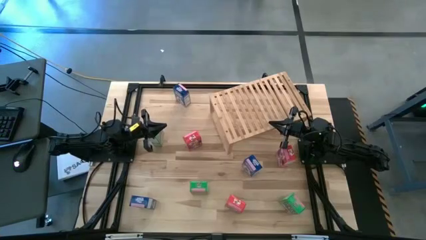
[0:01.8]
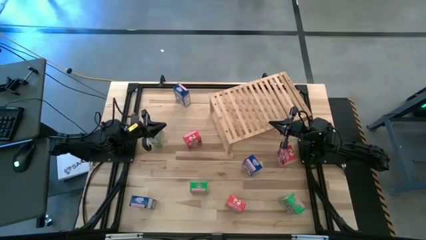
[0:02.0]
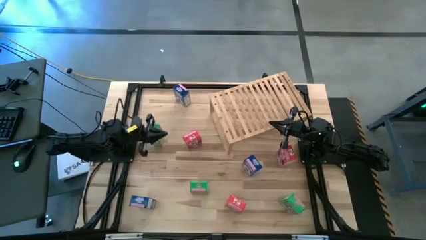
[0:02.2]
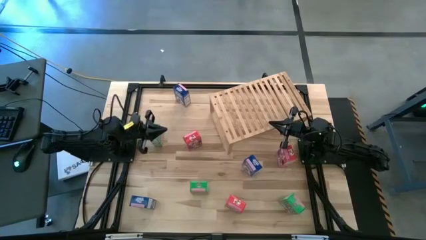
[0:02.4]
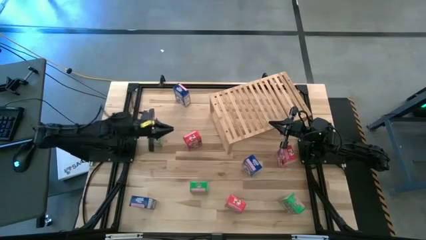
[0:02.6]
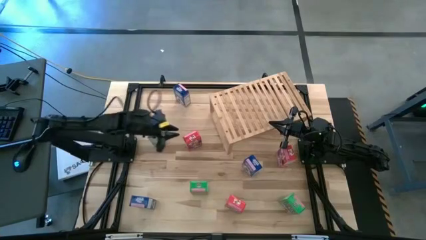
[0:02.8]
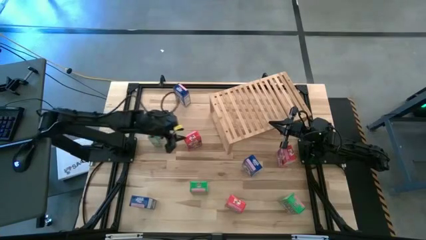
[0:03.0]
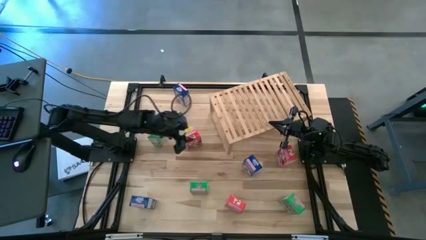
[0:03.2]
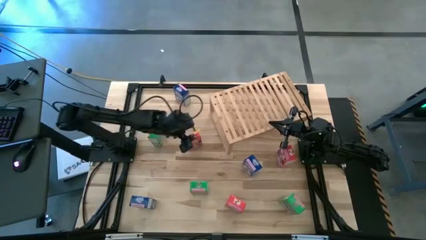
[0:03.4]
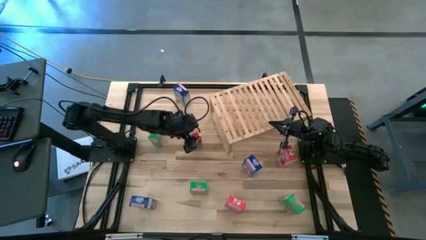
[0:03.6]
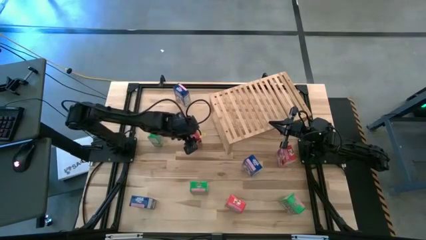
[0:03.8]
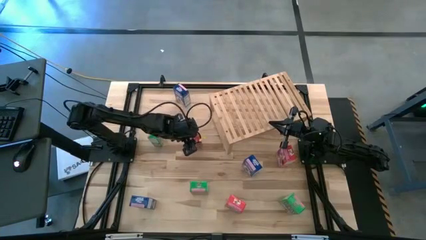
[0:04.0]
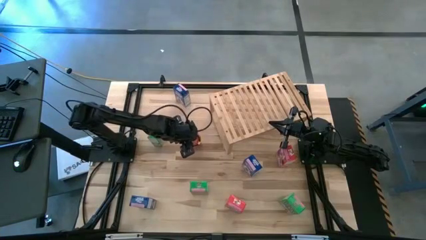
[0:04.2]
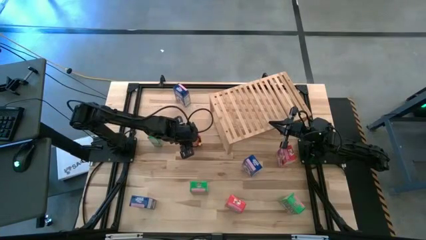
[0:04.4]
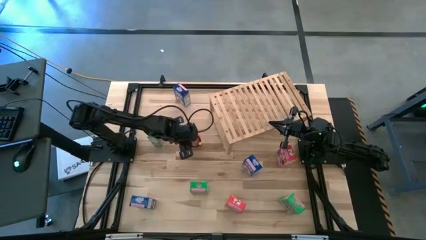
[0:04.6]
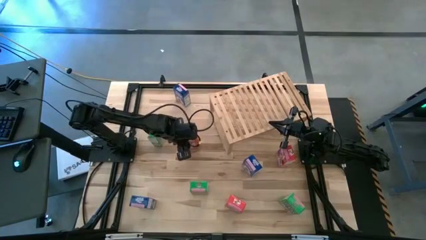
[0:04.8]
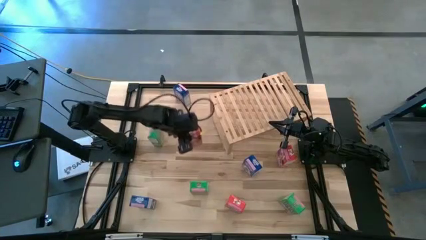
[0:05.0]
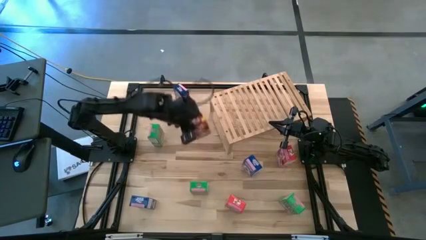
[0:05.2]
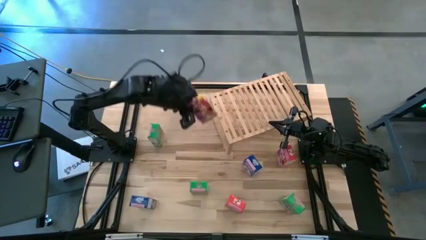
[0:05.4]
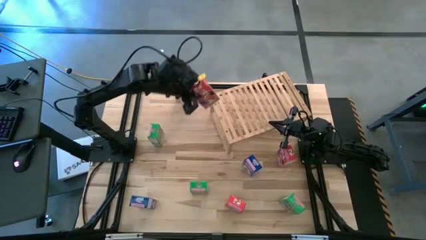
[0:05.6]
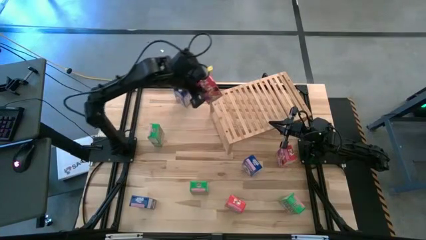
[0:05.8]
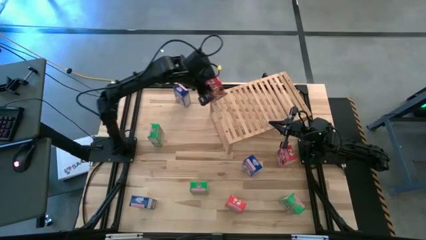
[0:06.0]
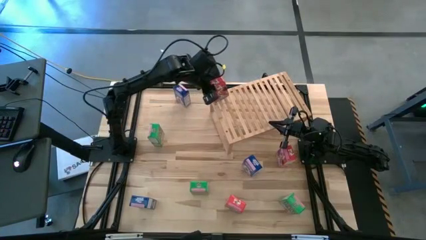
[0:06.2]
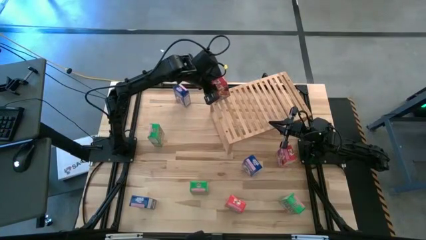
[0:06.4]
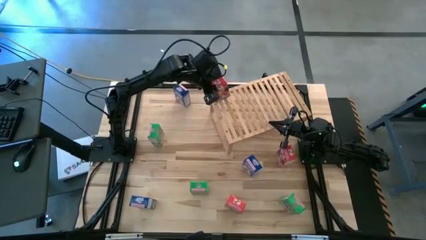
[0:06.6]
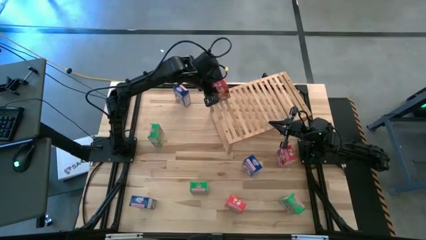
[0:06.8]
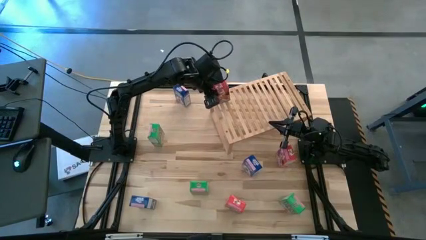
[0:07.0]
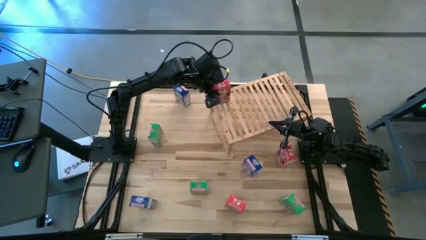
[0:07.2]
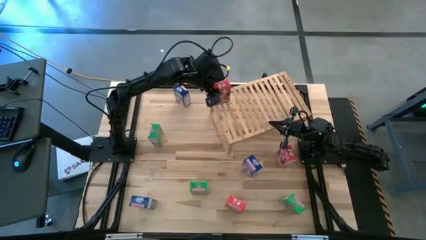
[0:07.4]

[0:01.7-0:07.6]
Task: Stack cereal on shelf
Put the top left red cereal box on the shelf

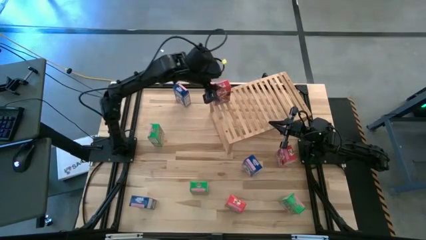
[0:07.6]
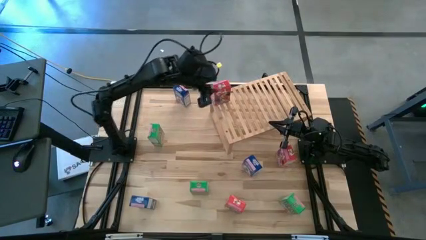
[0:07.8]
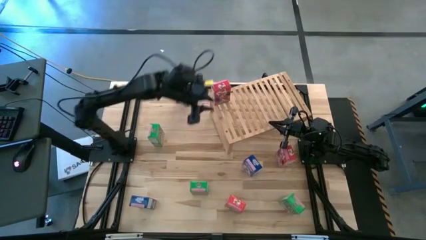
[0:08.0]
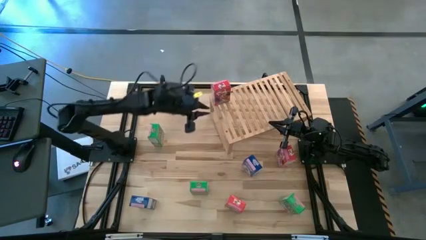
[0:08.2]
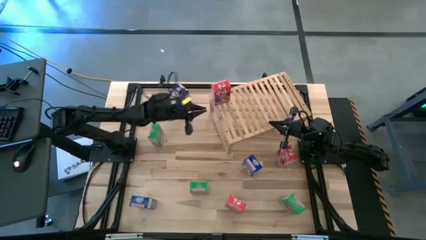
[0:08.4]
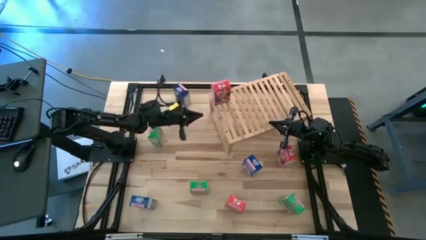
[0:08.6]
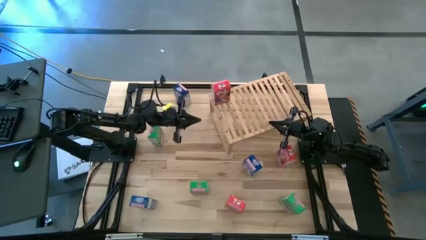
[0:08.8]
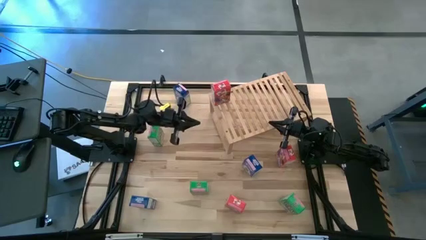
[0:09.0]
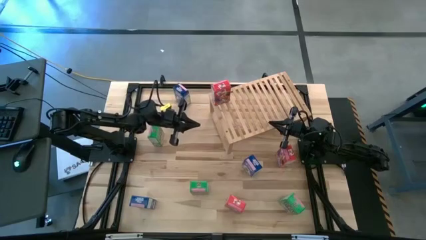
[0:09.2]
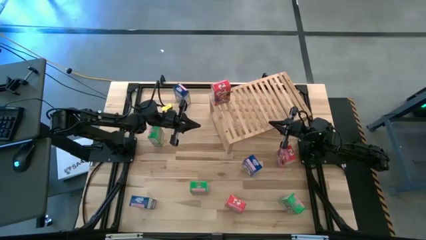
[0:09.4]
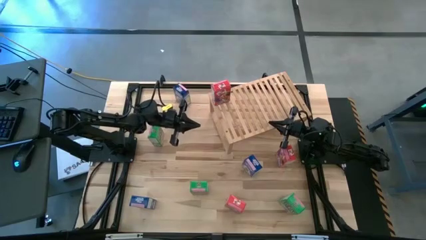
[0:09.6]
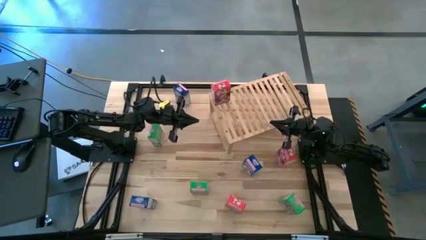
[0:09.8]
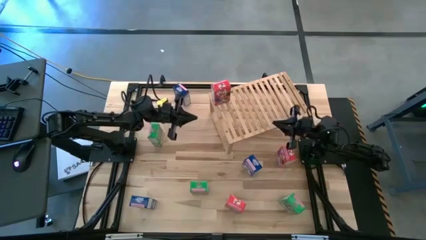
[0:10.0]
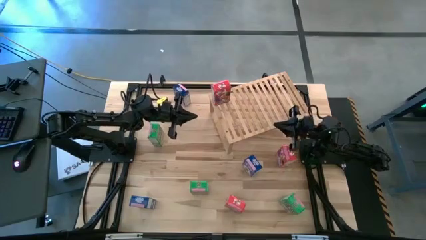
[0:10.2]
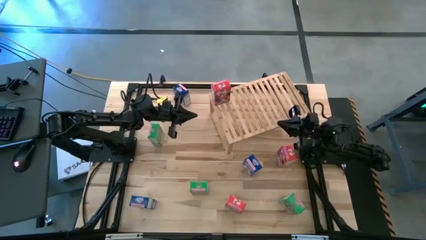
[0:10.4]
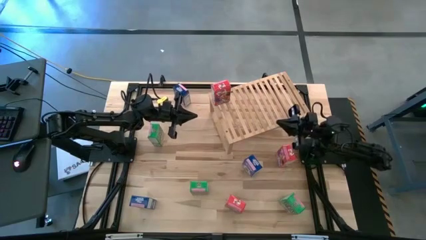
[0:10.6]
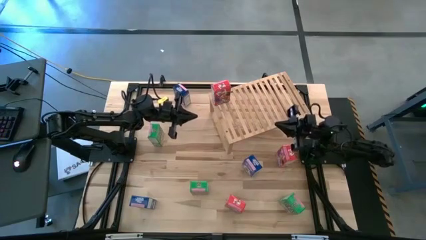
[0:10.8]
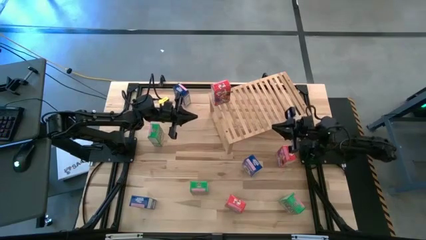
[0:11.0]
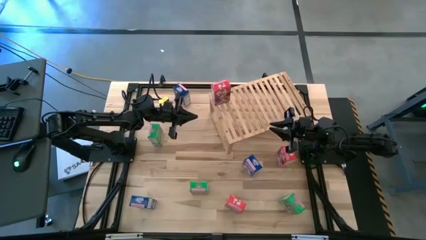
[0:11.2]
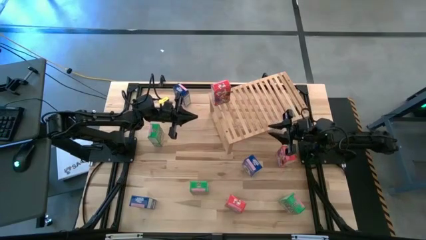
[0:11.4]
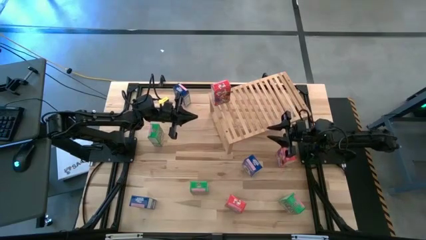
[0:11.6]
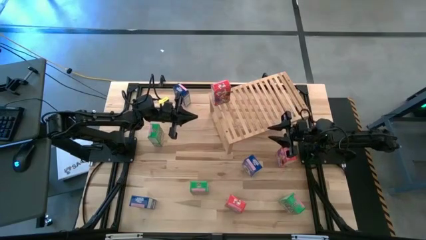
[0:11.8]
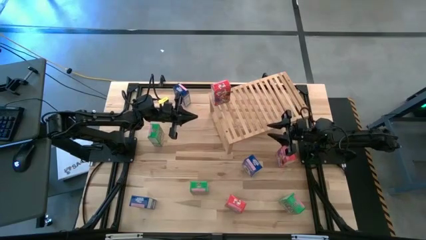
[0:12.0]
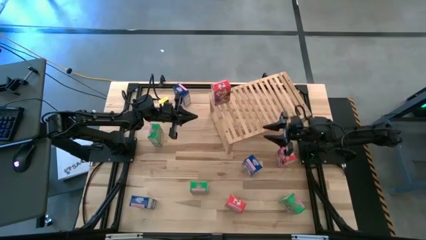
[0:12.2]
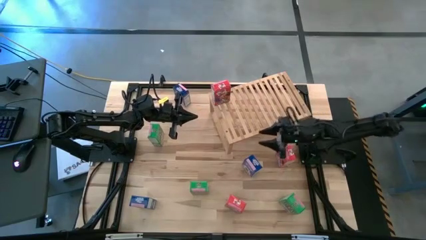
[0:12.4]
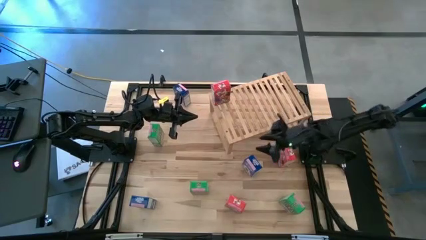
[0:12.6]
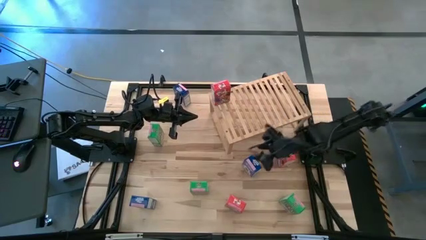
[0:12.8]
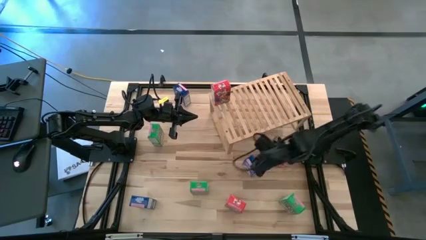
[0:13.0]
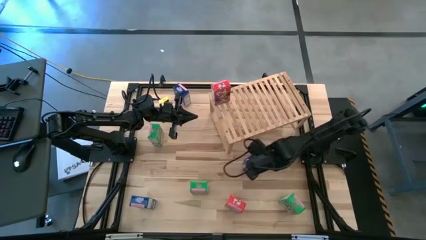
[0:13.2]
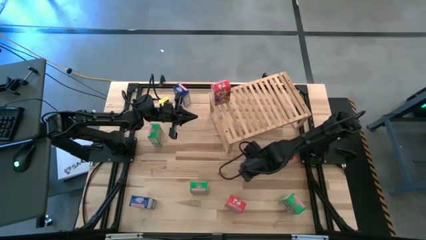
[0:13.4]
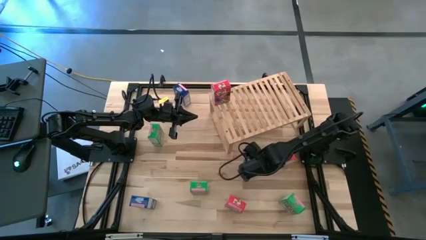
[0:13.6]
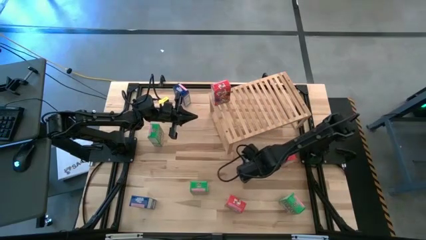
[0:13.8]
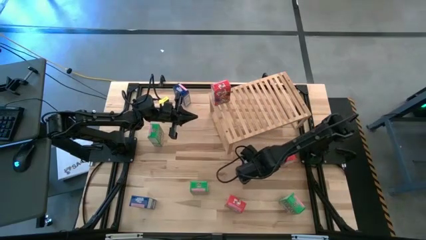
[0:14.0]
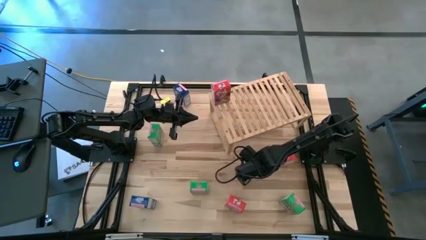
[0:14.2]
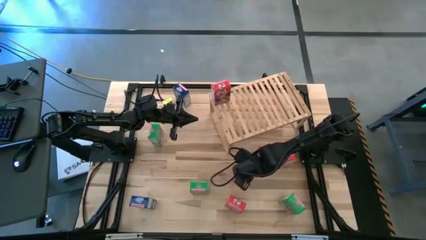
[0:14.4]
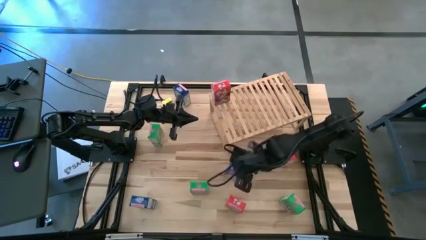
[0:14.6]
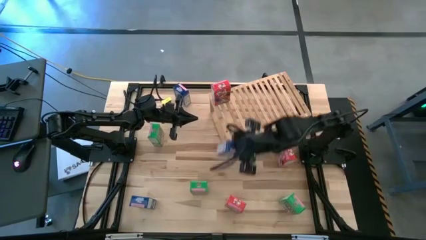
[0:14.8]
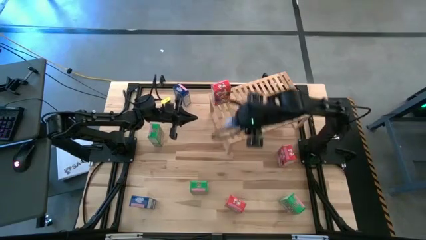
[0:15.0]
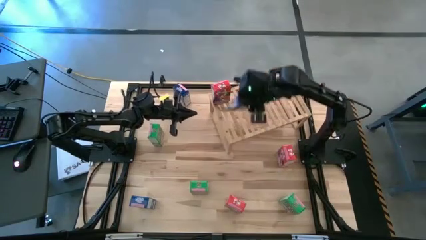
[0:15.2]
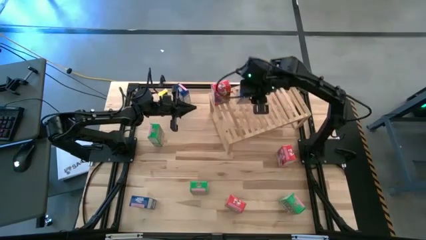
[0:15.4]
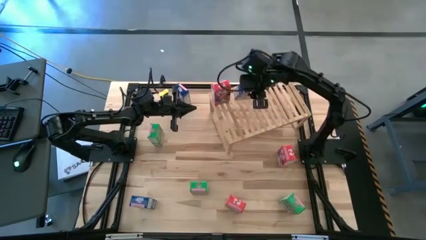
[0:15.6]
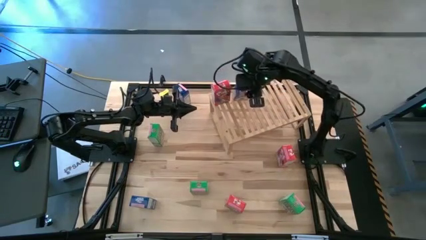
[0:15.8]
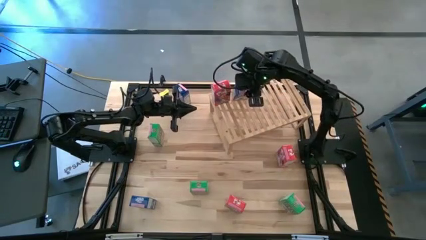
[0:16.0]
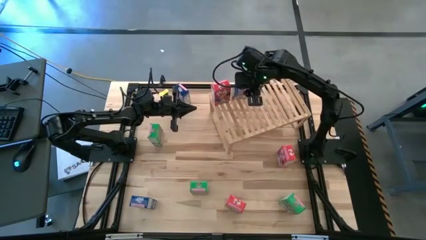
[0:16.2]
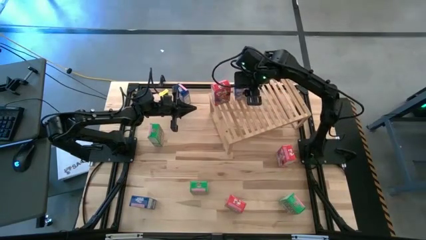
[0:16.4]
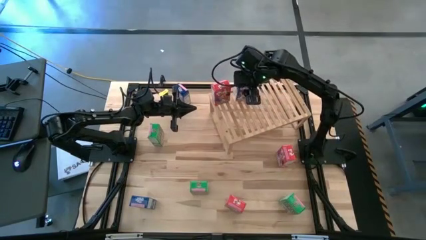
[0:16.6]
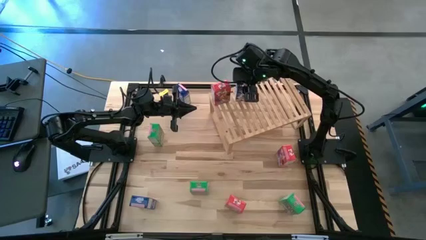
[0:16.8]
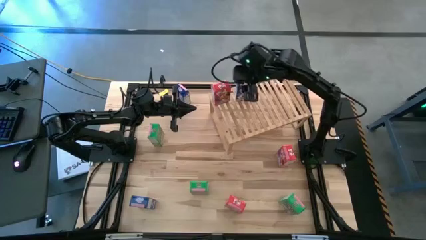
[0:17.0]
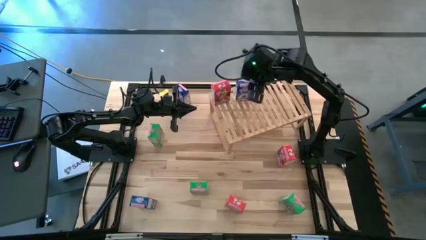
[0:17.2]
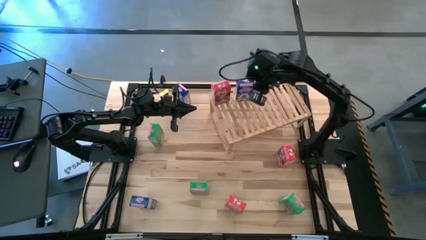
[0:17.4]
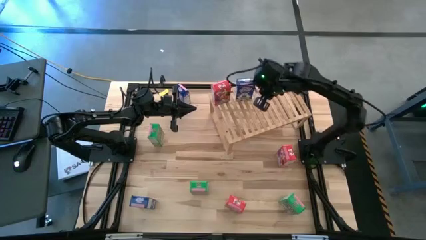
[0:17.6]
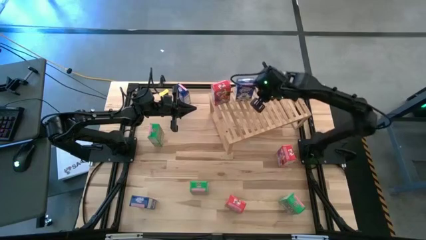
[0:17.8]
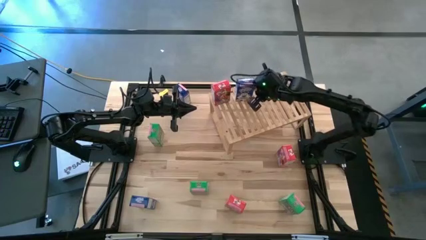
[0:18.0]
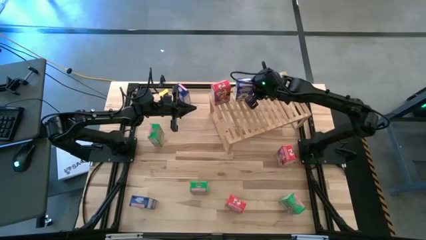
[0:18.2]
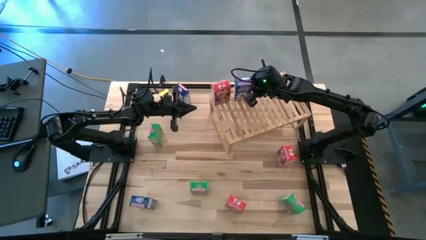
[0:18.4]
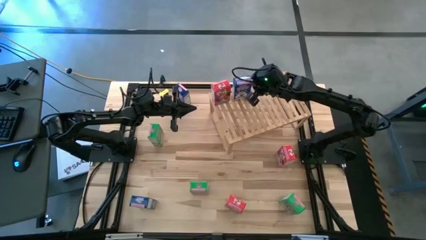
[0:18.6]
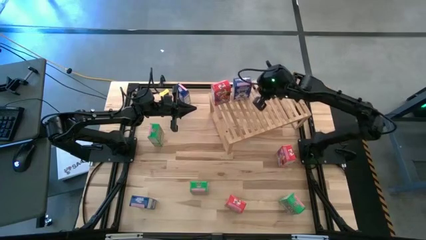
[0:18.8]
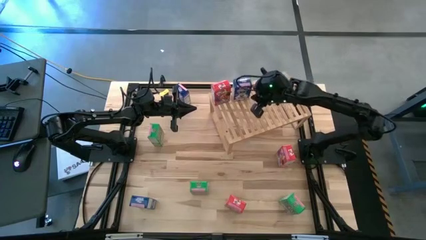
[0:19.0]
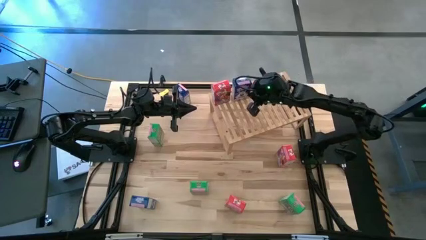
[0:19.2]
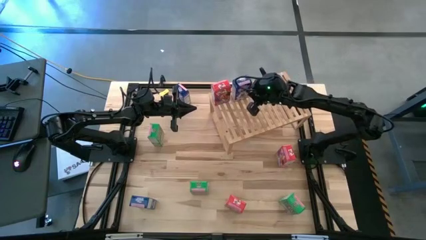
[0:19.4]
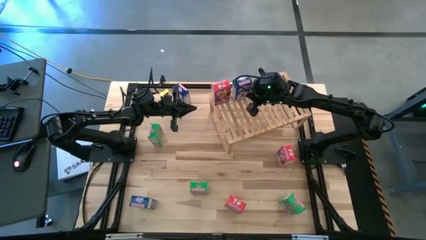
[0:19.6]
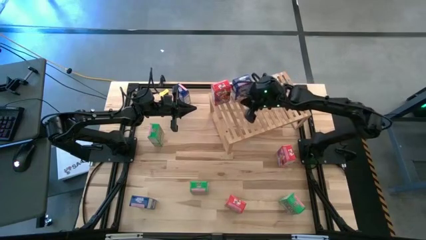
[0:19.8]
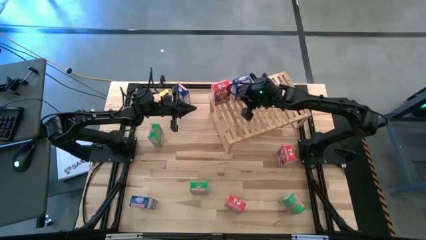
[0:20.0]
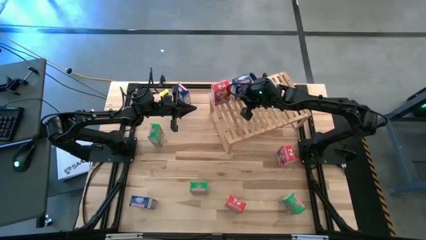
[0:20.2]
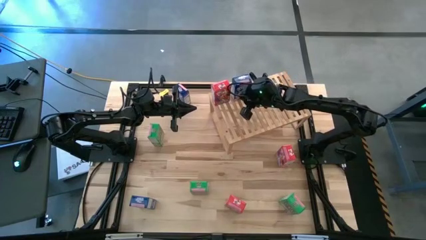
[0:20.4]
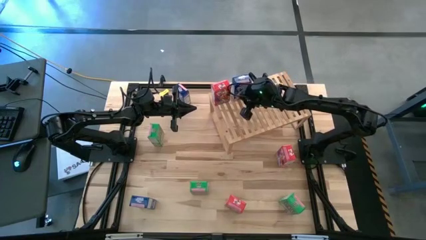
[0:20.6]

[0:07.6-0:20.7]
Put the middle right blue cereal box on the shelf
